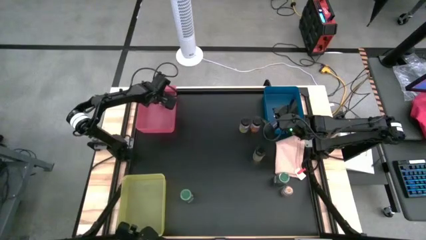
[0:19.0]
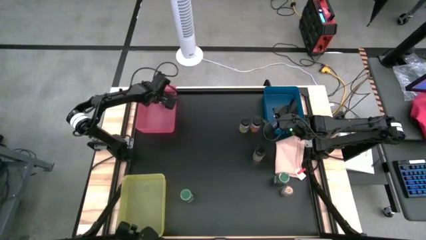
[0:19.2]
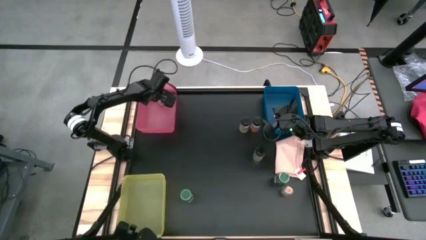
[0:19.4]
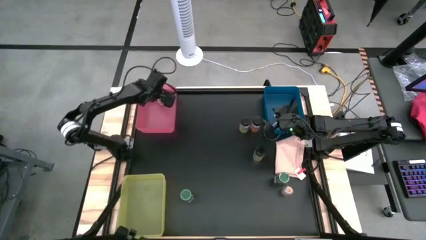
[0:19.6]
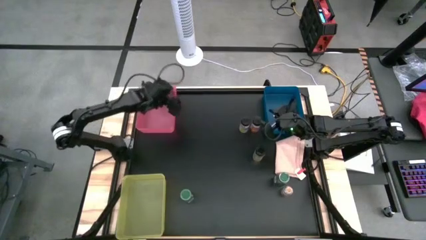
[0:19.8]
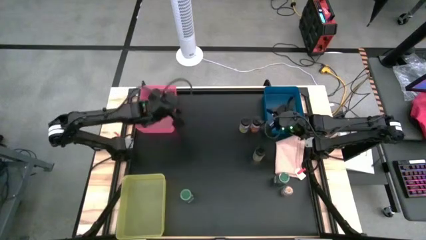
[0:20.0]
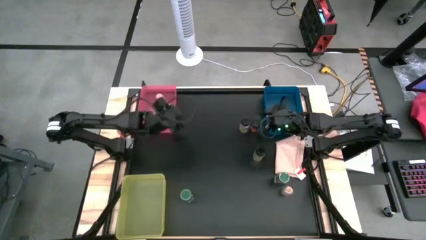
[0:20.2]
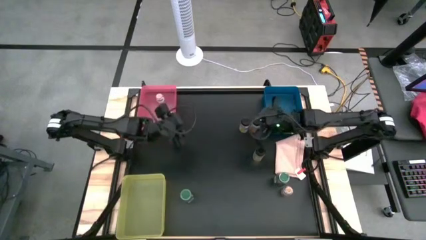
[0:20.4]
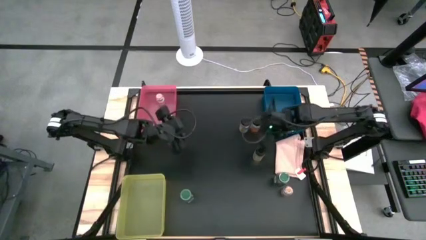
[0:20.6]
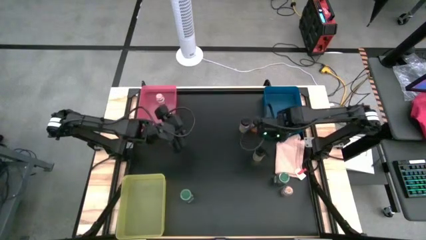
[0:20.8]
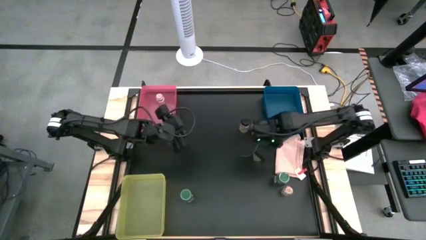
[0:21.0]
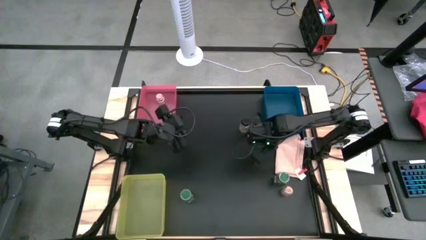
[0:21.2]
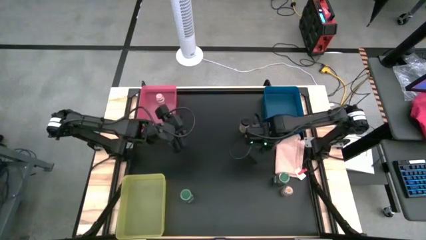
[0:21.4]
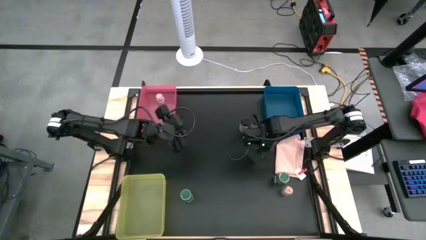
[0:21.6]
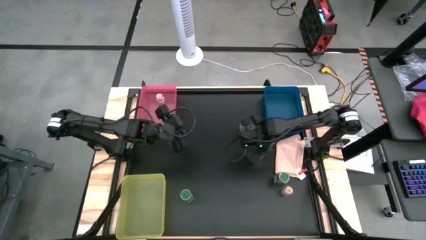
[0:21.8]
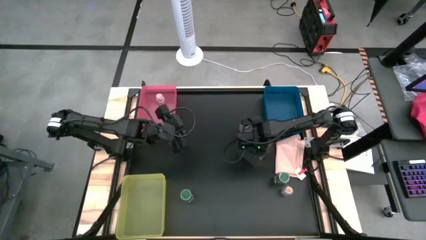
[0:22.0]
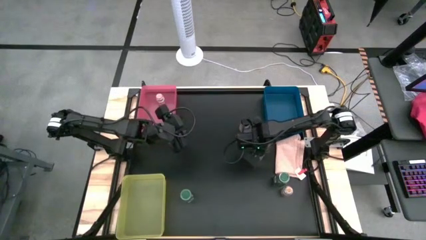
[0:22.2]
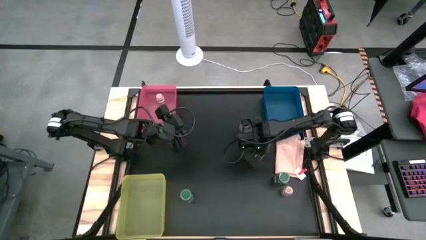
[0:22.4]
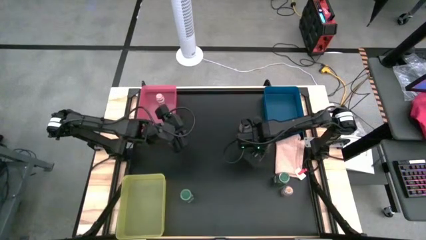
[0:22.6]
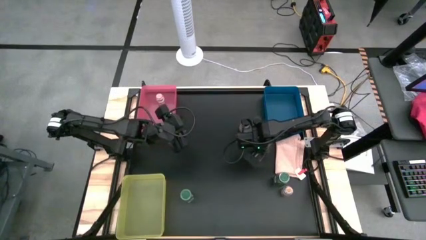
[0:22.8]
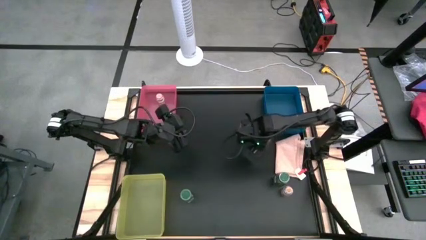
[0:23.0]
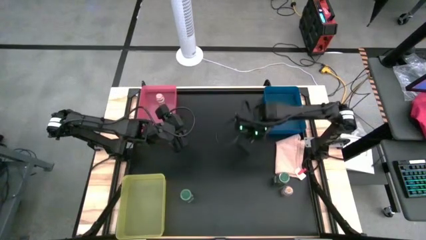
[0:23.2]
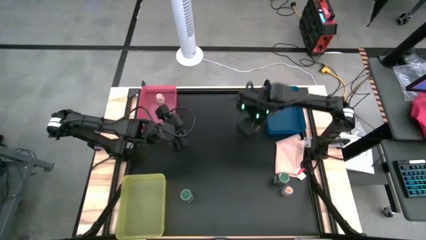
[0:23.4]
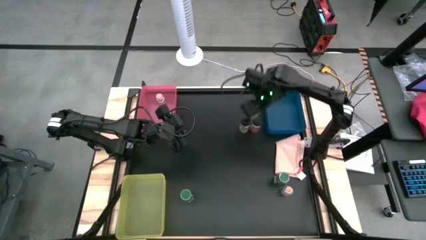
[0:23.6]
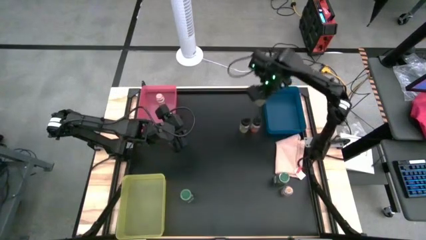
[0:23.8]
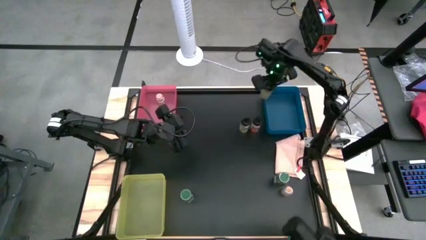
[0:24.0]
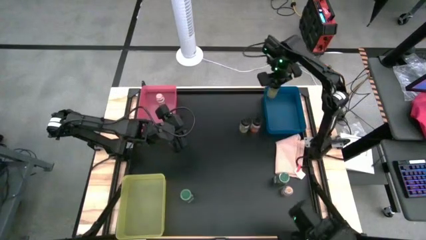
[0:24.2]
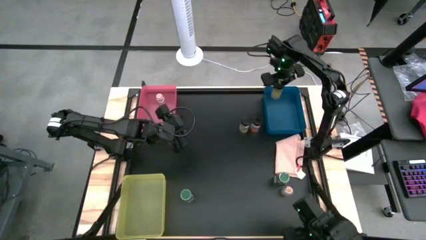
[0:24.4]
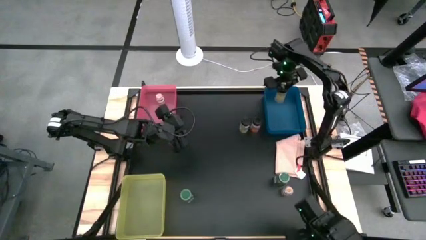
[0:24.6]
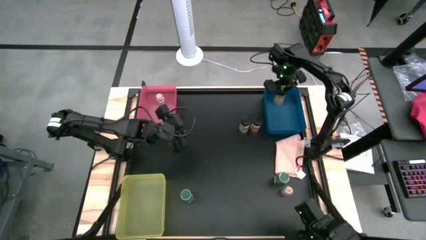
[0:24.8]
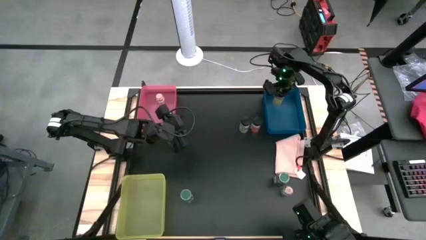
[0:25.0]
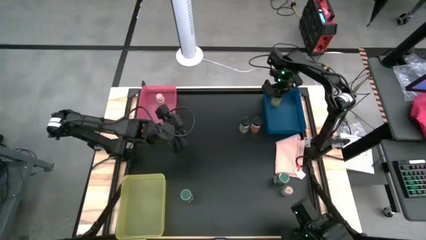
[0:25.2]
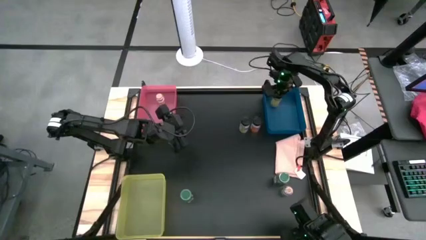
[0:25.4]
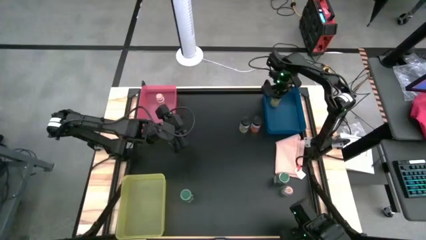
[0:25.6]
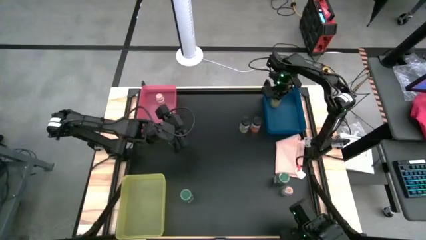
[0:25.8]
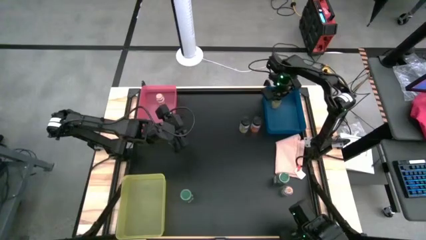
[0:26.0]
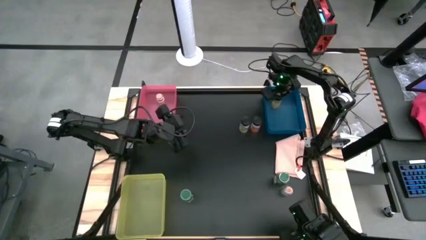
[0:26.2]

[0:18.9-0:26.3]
Task: Sort spices by type
Put the bottom black seasoning into the blue bin

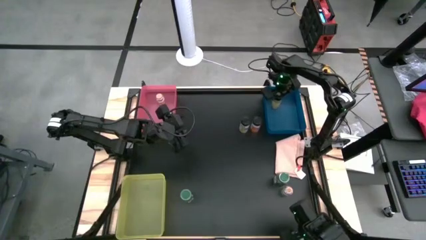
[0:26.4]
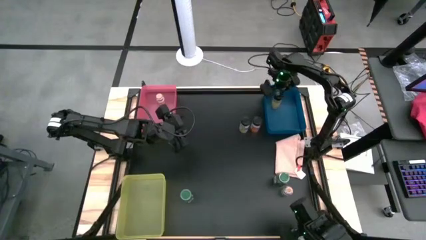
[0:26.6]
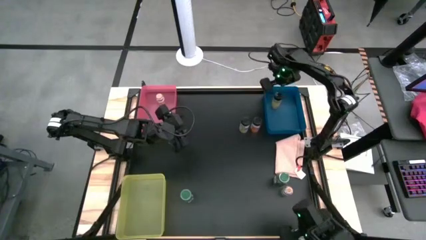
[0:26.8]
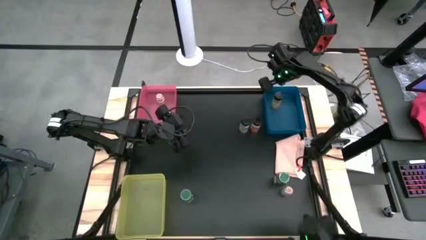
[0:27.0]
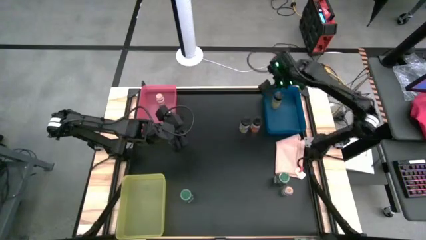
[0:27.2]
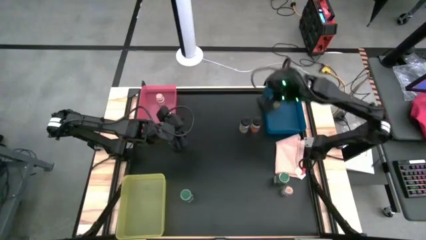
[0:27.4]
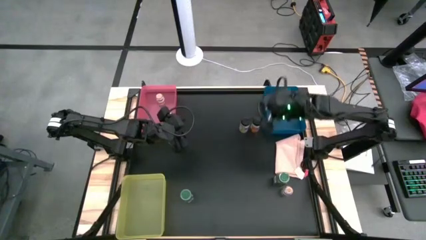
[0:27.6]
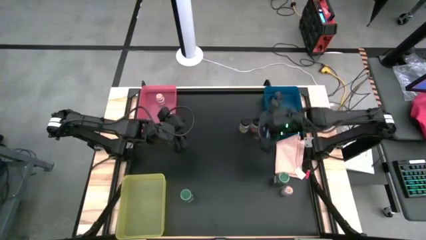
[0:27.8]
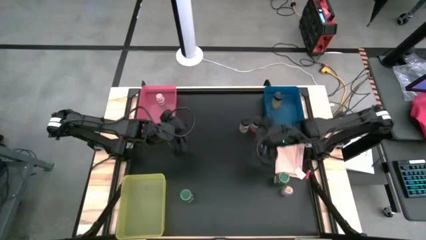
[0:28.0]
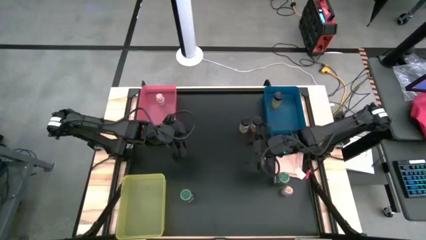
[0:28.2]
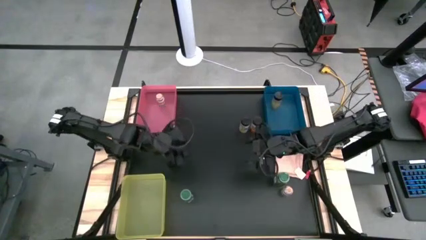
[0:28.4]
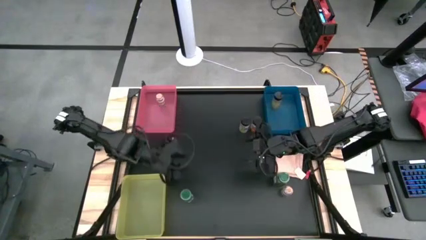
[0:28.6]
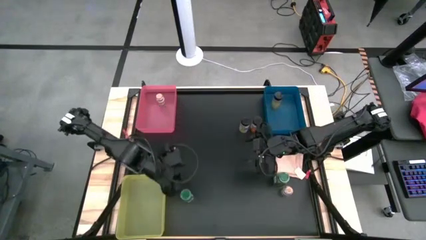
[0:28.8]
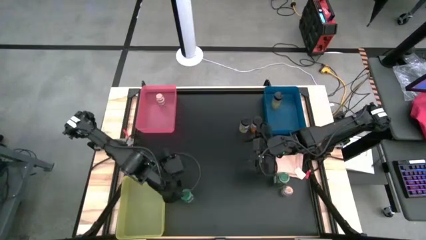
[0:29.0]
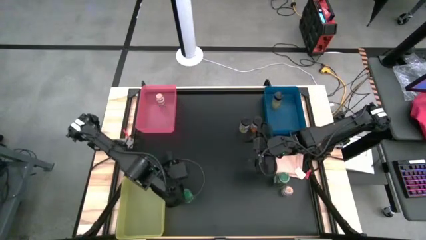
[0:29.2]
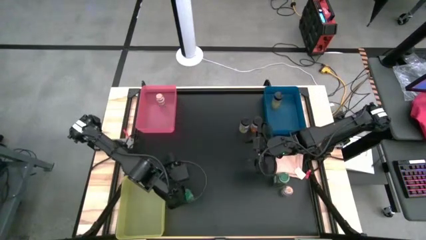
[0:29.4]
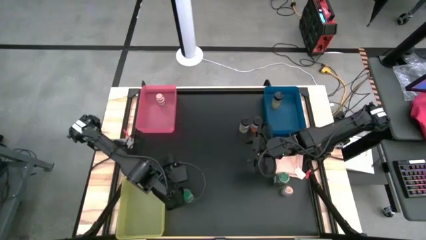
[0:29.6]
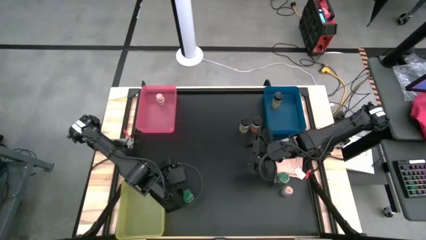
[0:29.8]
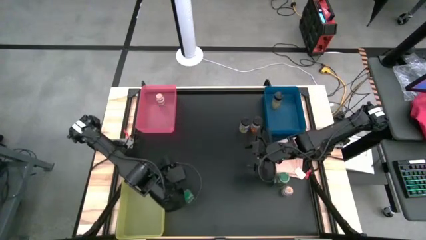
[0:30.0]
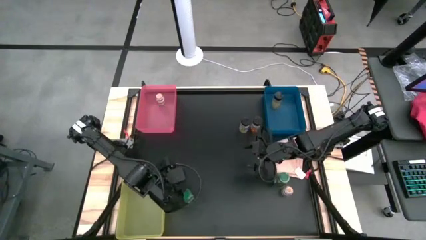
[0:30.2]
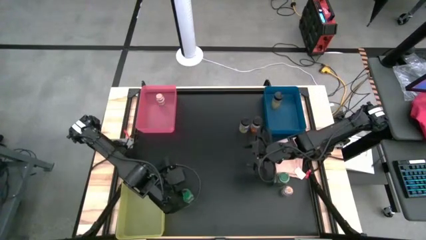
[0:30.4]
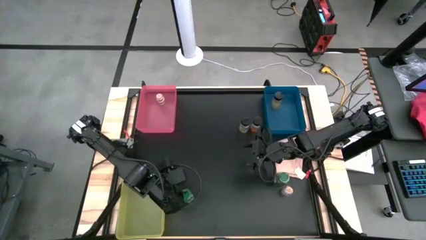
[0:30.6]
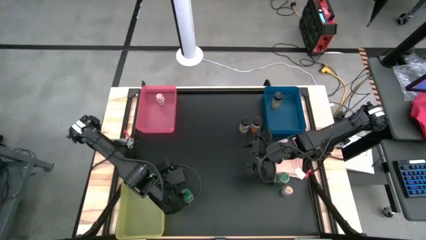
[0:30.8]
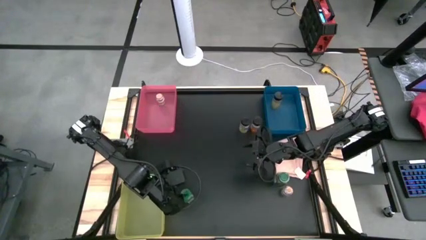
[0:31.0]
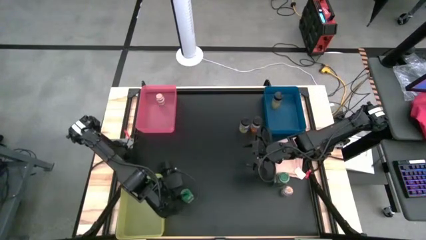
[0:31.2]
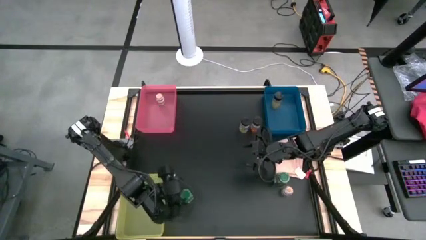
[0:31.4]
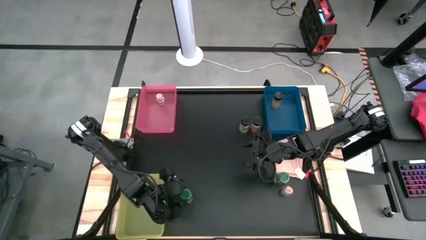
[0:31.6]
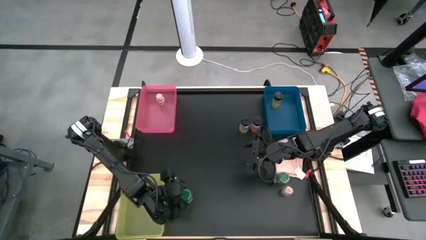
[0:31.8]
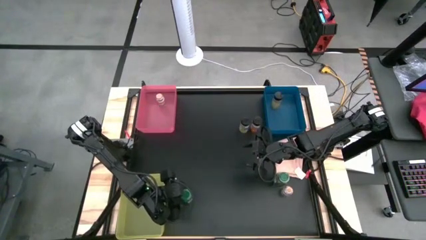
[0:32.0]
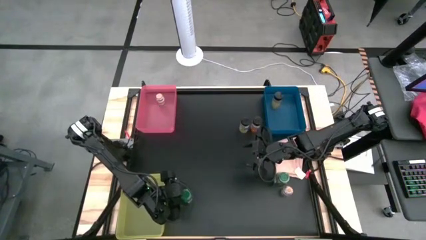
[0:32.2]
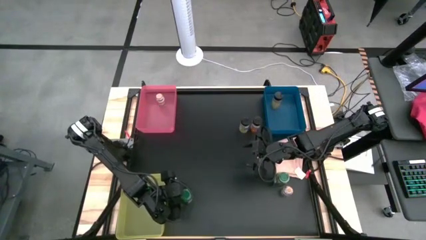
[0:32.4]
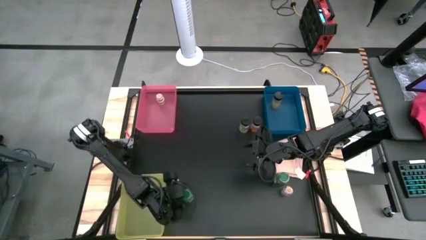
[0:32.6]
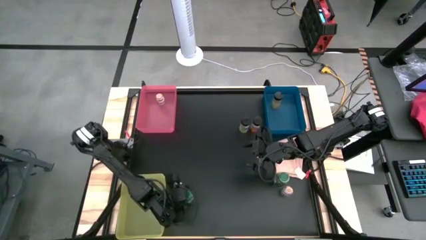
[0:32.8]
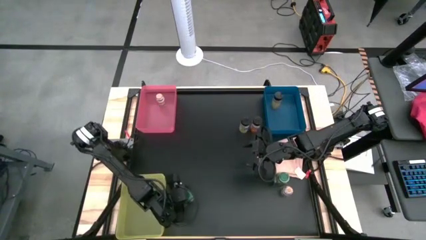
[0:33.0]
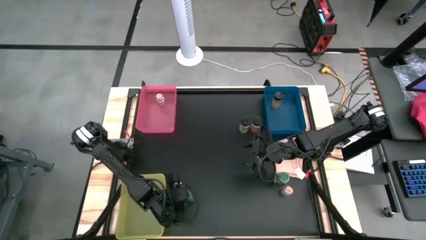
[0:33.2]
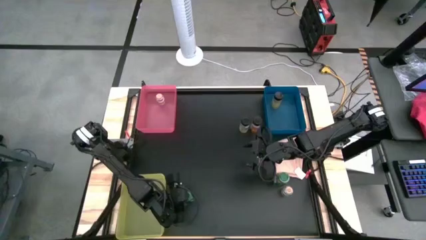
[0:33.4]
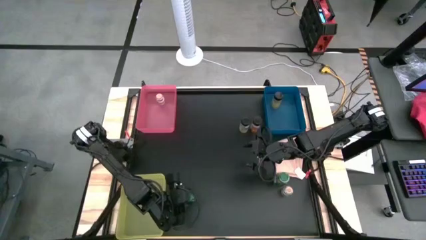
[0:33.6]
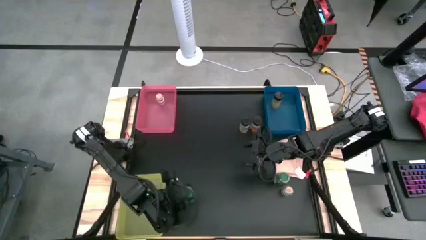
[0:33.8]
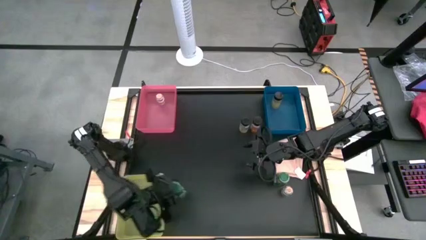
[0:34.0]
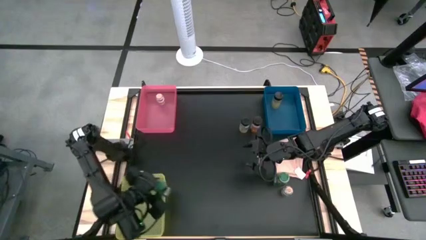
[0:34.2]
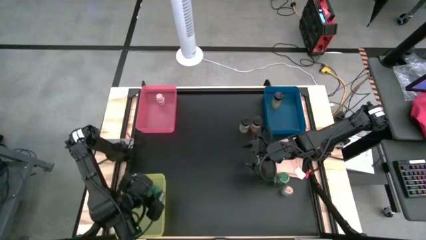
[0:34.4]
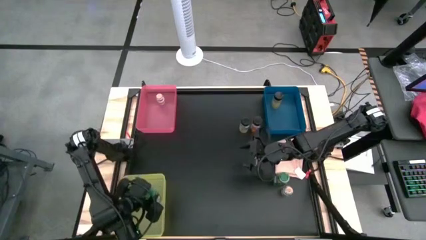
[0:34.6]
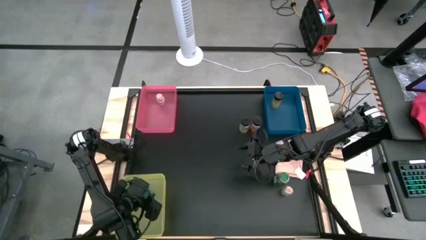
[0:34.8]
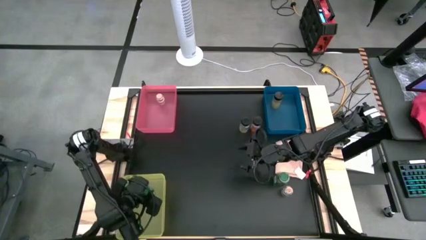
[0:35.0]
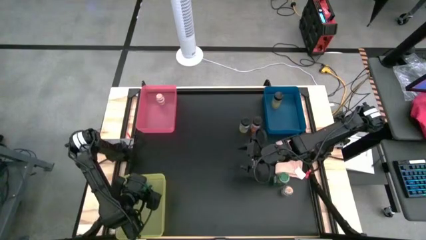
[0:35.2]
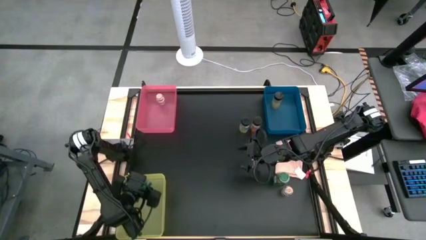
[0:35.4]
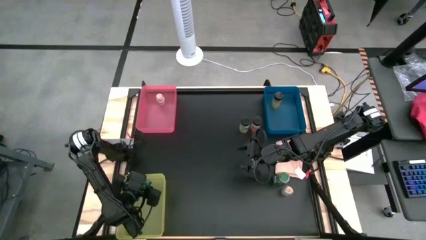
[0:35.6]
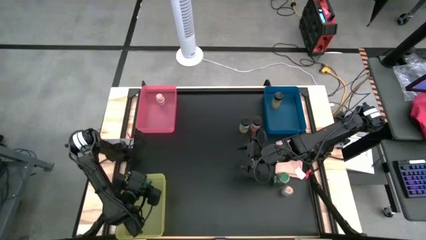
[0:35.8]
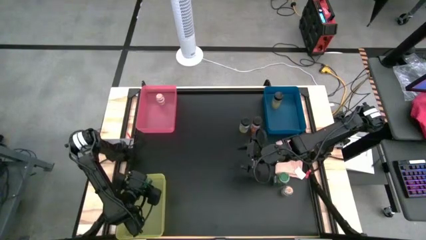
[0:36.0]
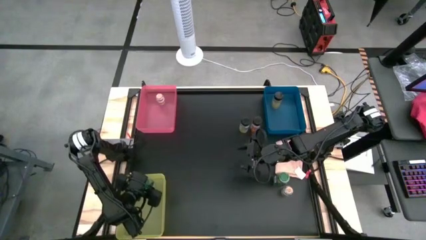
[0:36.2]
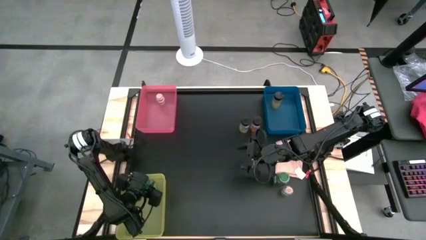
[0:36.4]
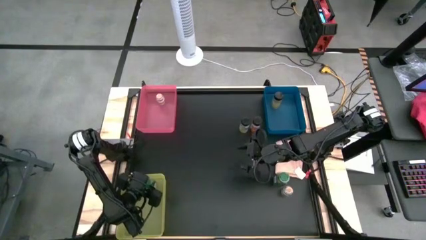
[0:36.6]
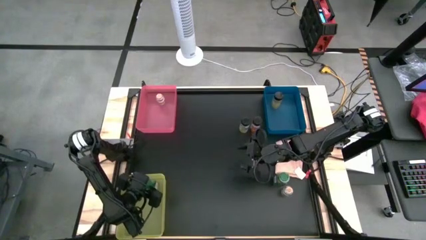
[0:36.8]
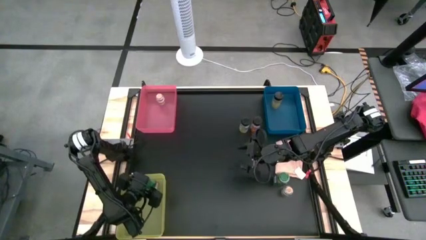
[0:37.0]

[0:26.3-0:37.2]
Put the left green seasoning into the yellow bin
